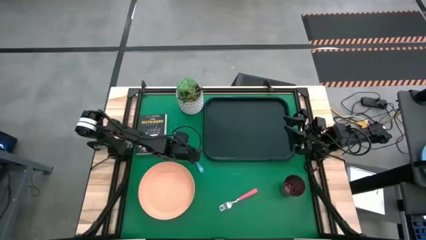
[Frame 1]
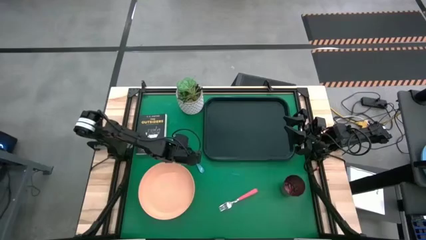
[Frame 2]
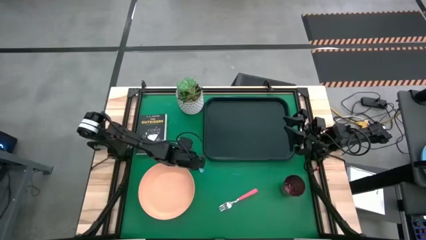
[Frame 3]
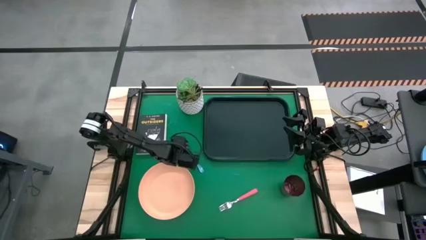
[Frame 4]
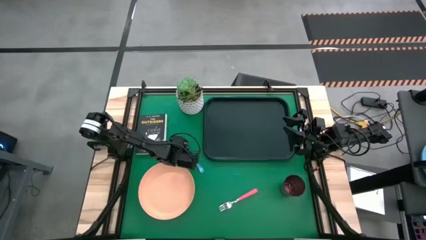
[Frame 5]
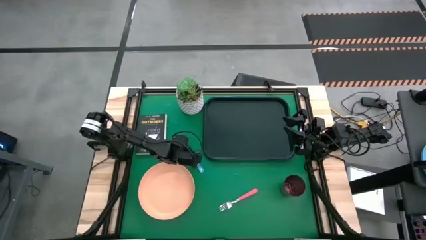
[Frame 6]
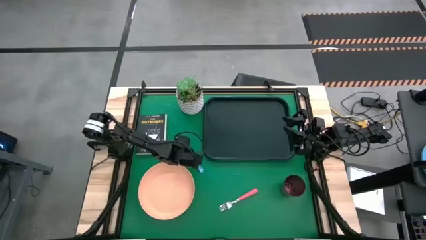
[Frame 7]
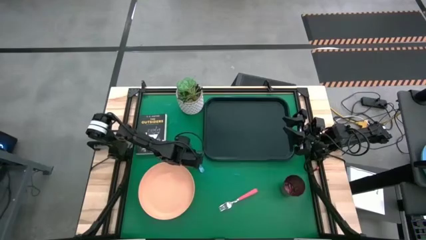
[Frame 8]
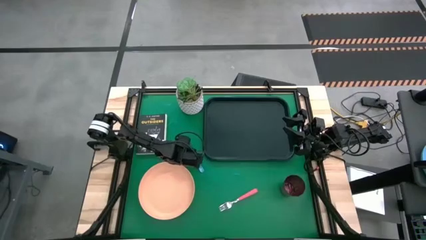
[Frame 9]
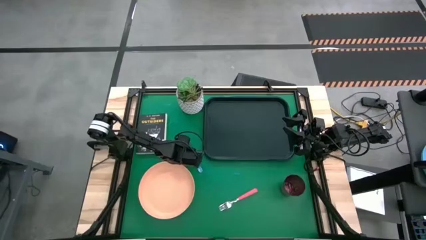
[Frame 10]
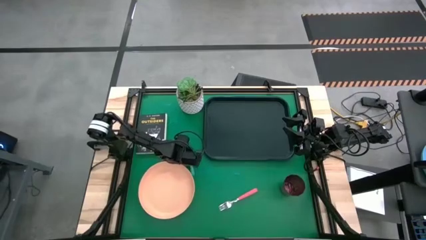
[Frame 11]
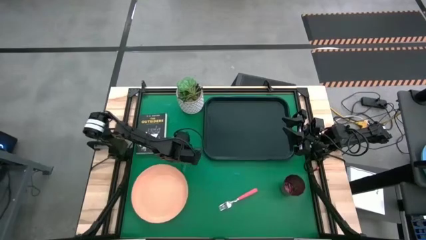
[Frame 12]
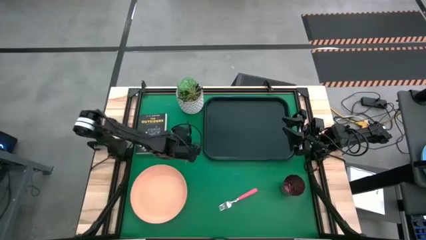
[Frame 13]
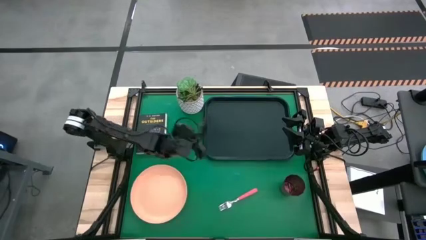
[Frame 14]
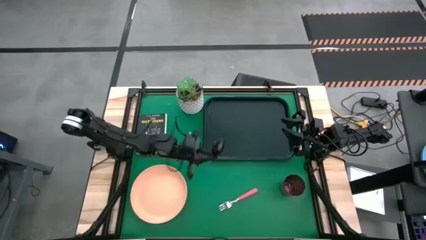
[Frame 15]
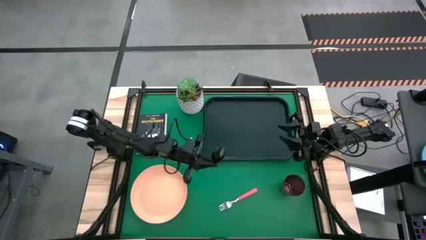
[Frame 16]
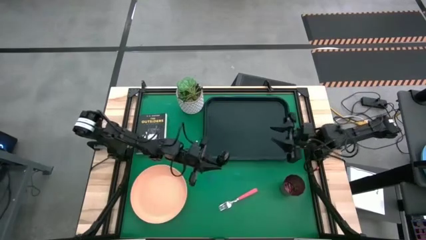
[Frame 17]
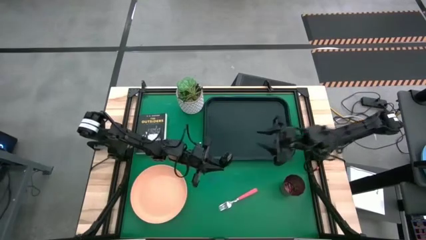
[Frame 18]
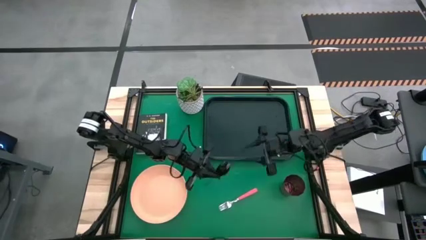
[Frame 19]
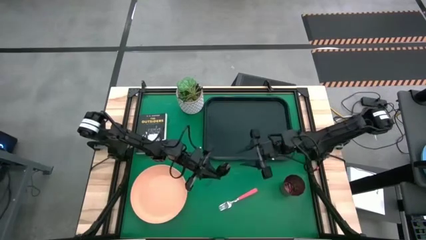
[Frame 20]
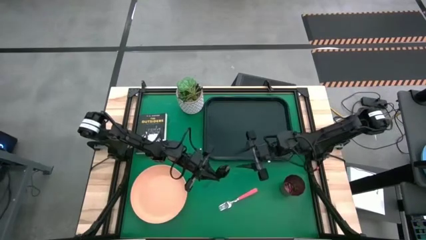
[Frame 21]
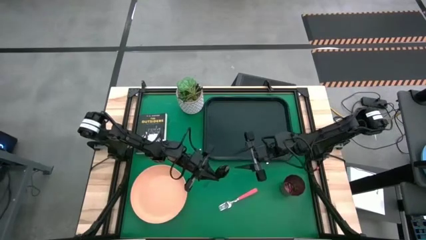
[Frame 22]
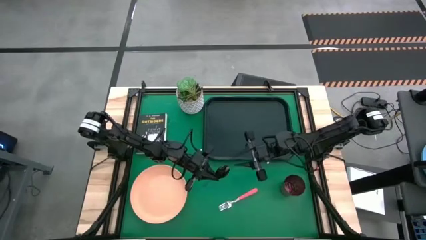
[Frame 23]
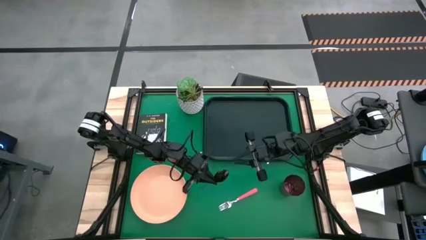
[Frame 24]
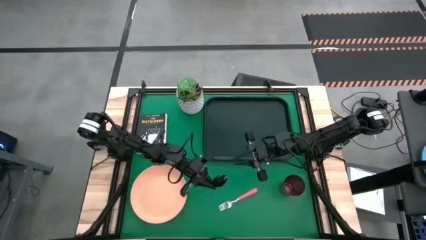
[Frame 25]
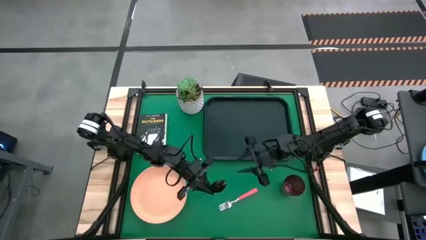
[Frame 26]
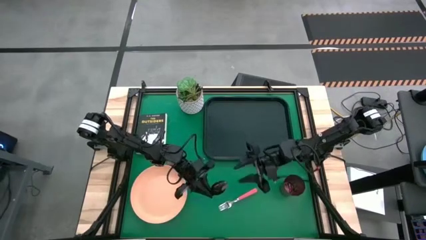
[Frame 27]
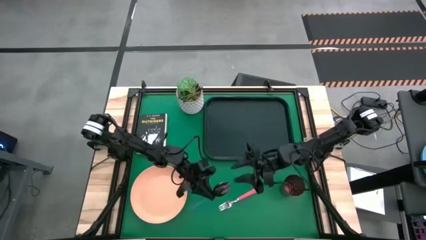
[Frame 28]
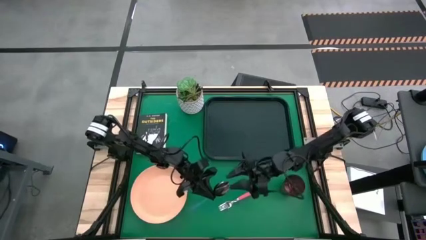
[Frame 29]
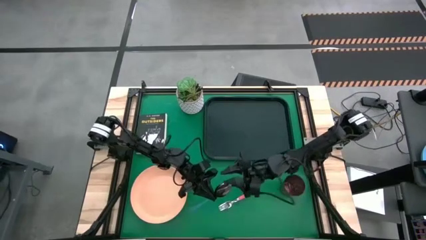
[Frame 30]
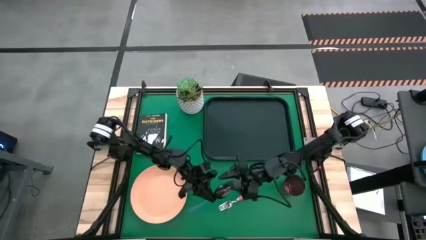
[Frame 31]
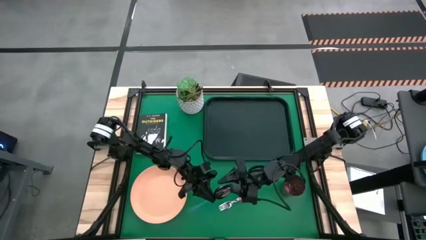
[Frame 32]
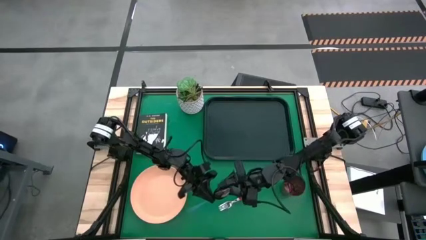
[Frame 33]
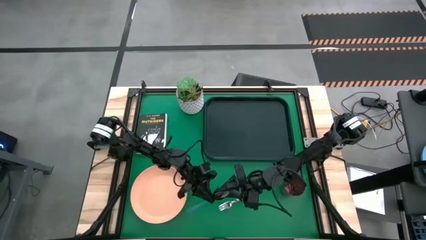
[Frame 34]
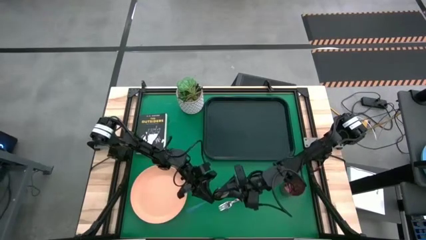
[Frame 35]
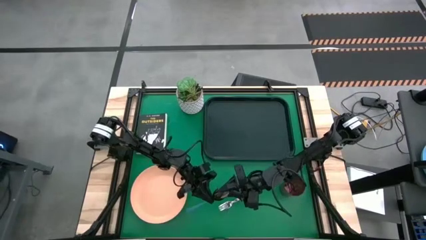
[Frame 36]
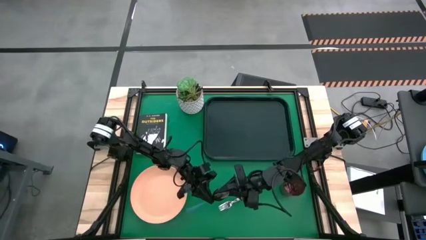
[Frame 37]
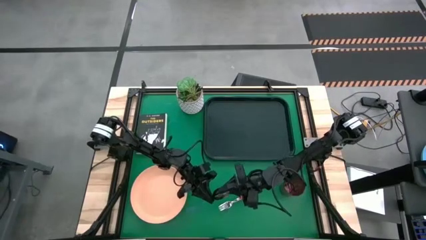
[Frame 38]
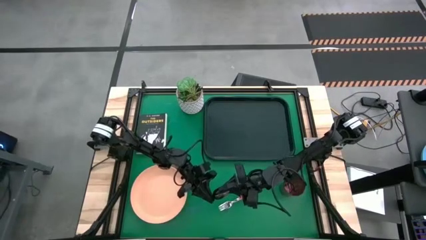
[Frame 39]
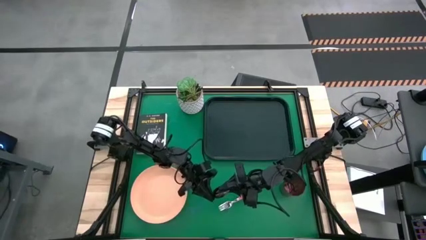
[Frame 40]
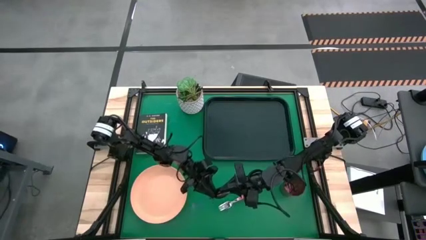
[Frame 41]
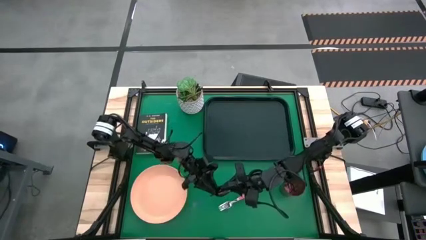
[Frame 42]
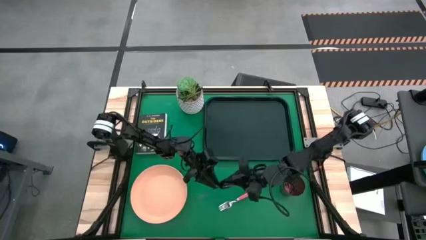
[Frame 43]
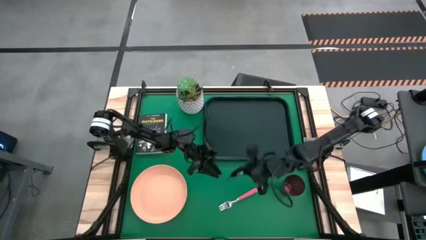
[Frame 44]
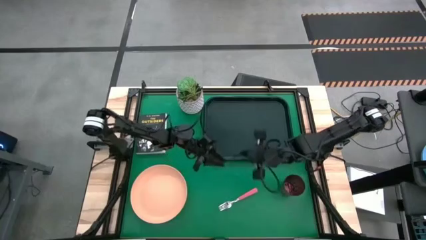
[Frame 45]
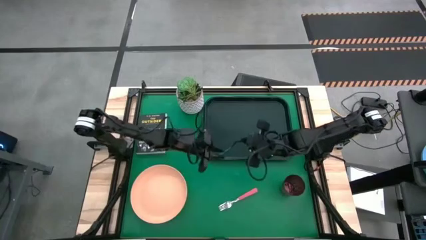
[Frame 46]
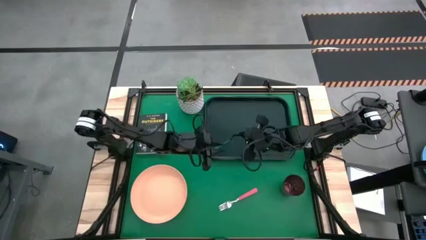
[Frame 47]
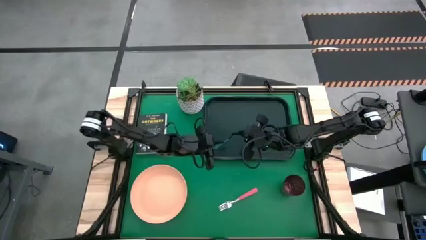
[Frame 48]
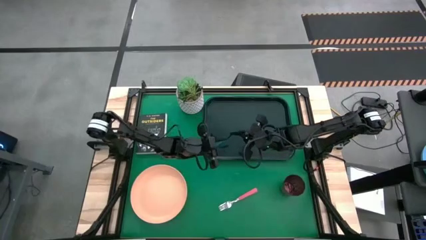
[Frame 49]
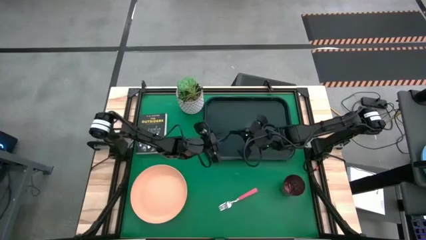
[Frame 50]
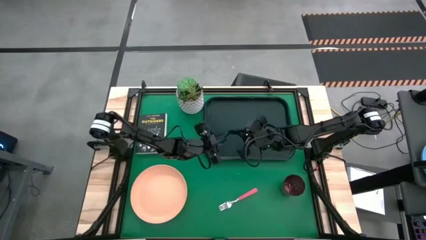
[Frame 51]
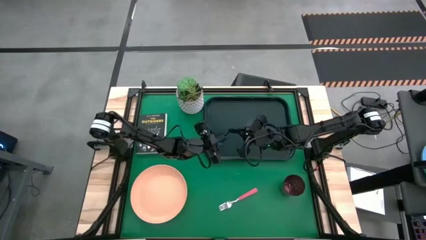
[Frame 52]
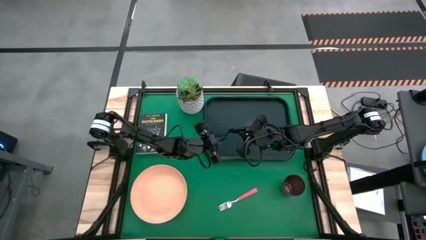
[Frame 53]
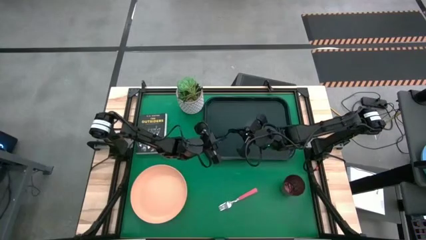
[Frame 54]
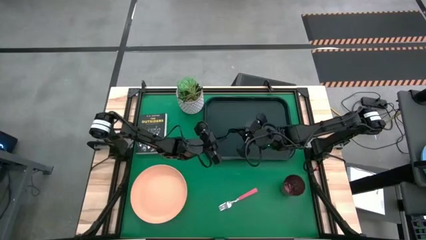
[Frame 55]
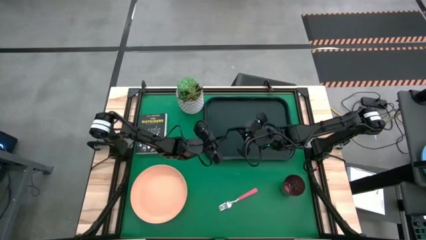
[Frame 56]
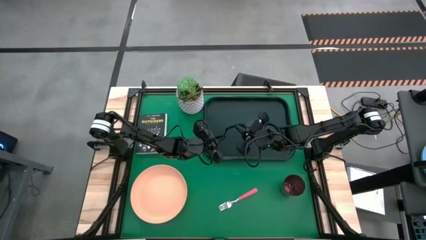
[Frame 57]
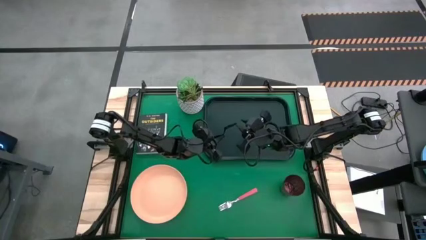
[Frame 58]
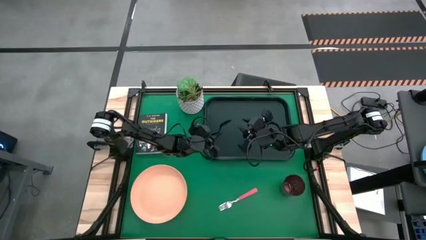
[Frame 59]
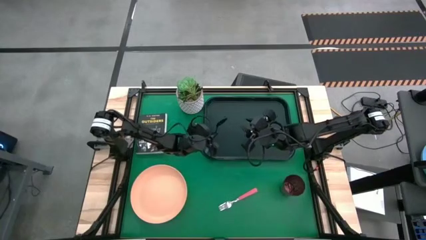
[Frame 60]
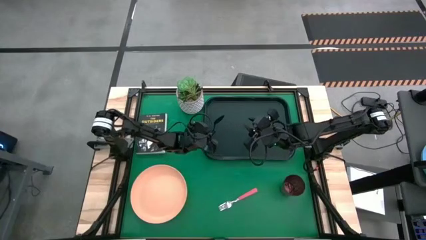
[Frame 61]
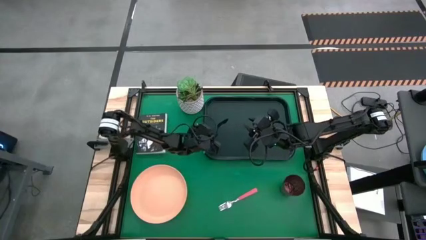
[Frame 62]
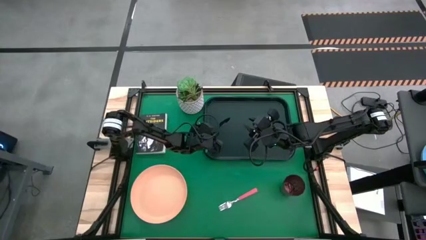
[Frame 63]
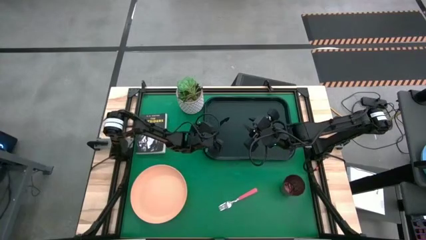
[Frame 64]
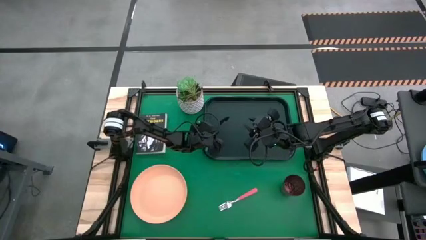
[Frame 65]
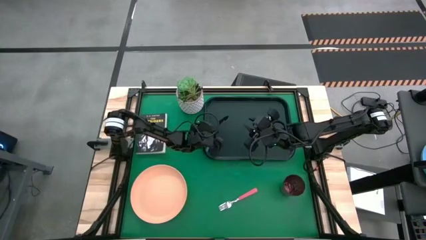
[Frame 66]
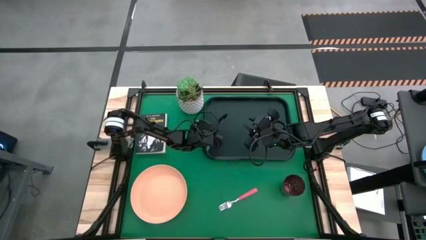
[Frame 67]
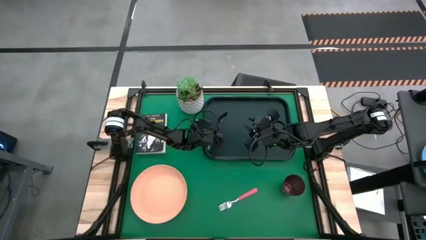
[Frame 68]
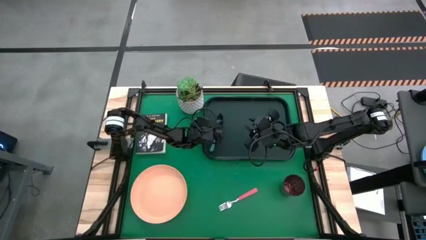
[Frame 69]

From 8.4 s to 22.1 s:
Task: Pick and place plate/cup/fork/spoon on tray
Put the blue spoon on the tray
